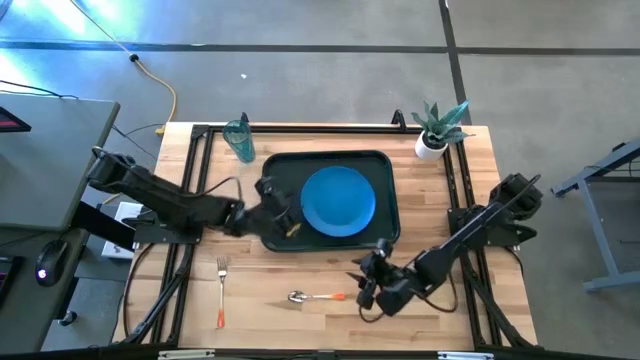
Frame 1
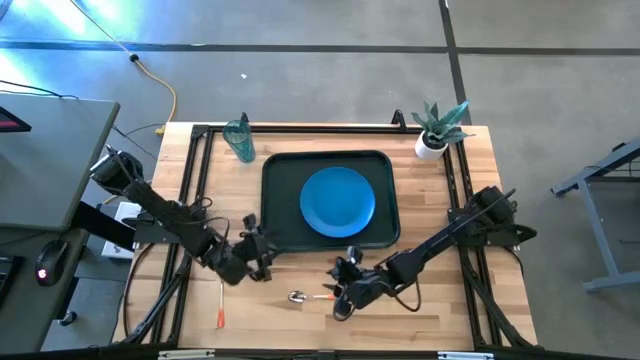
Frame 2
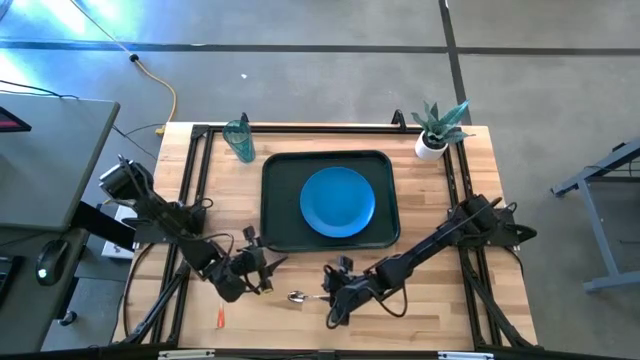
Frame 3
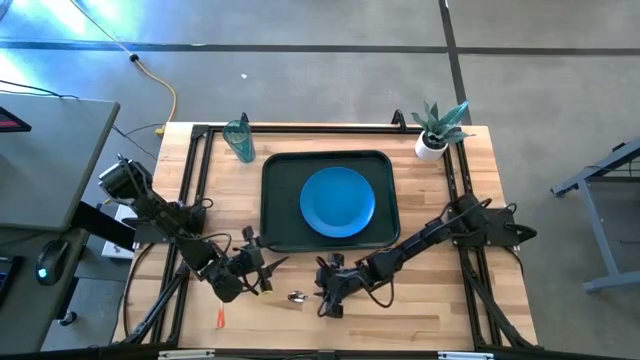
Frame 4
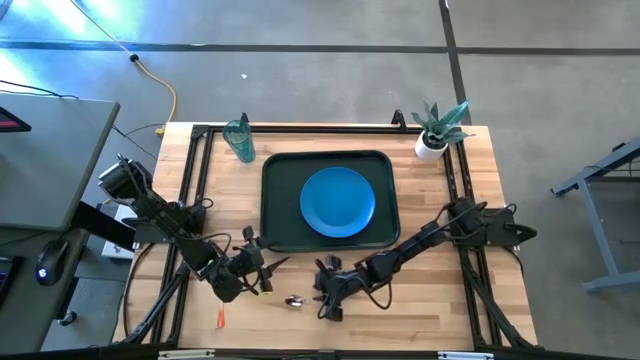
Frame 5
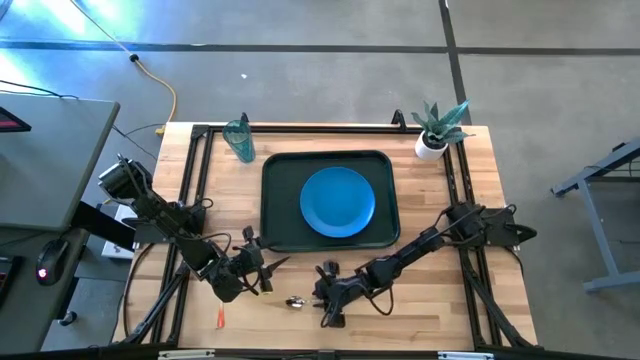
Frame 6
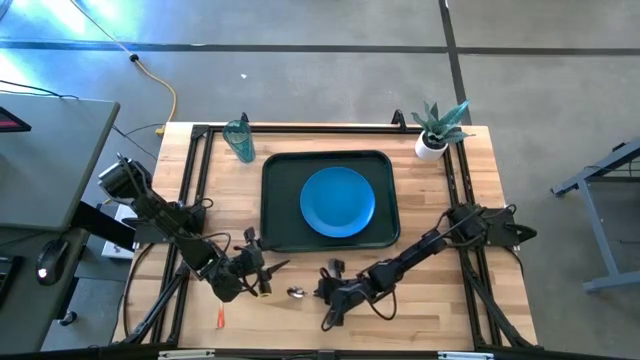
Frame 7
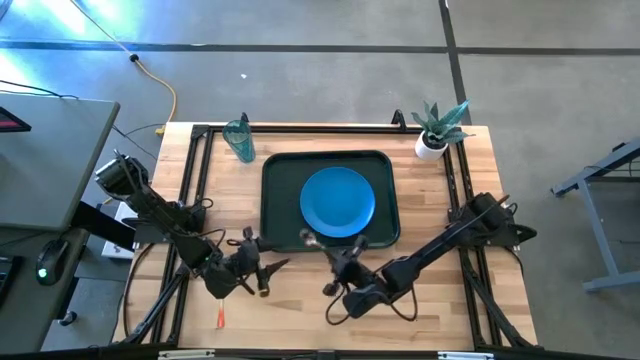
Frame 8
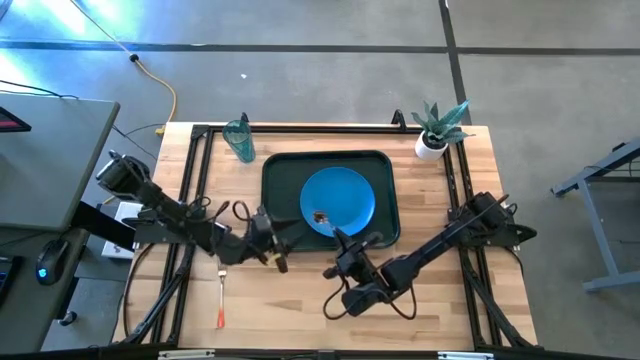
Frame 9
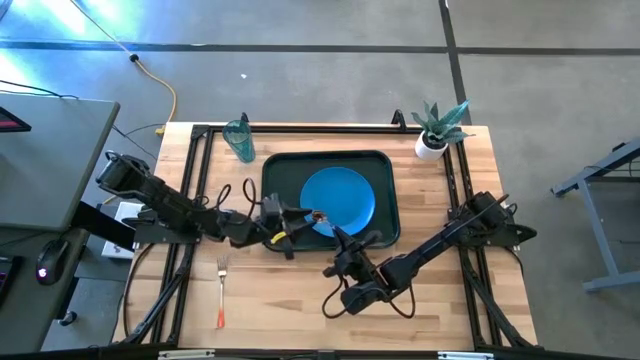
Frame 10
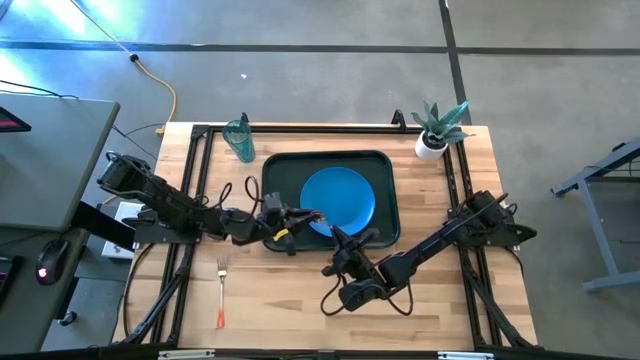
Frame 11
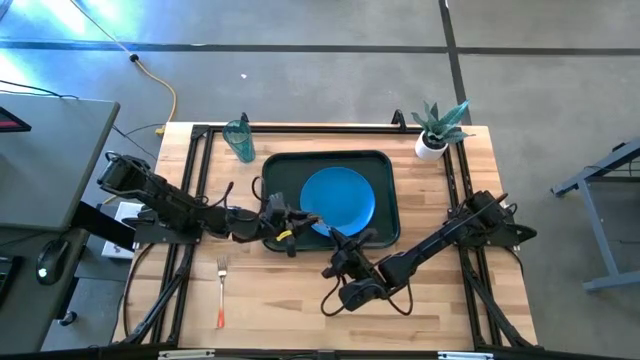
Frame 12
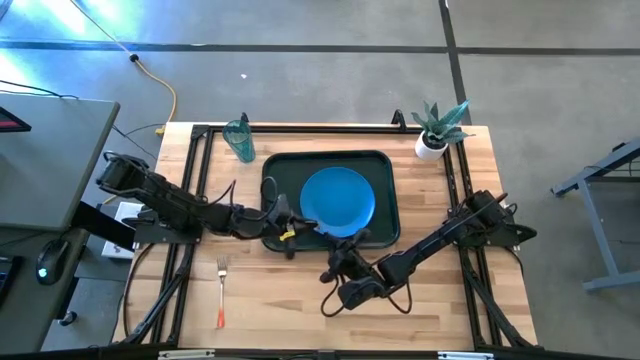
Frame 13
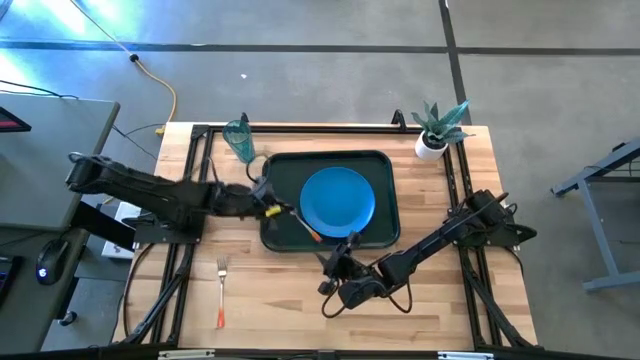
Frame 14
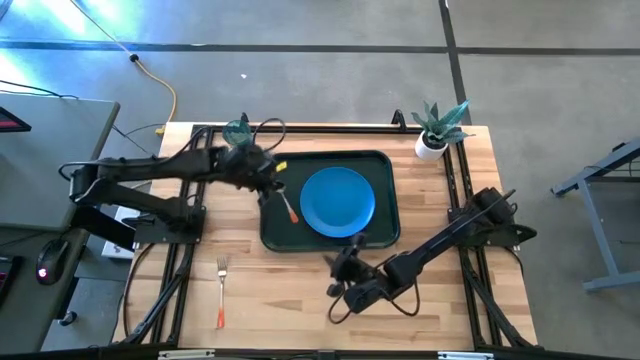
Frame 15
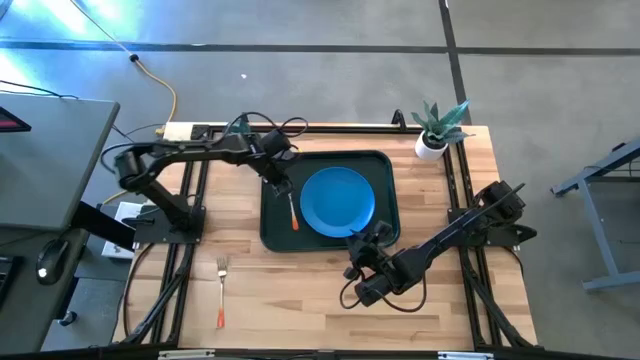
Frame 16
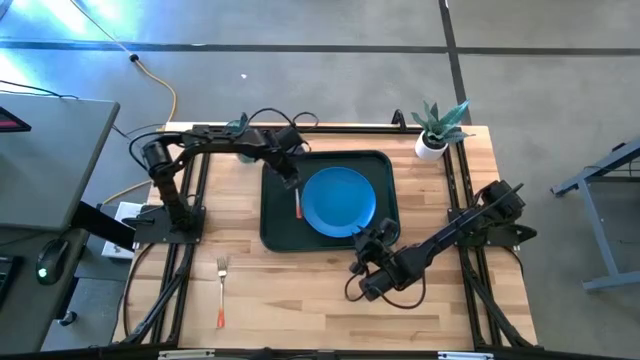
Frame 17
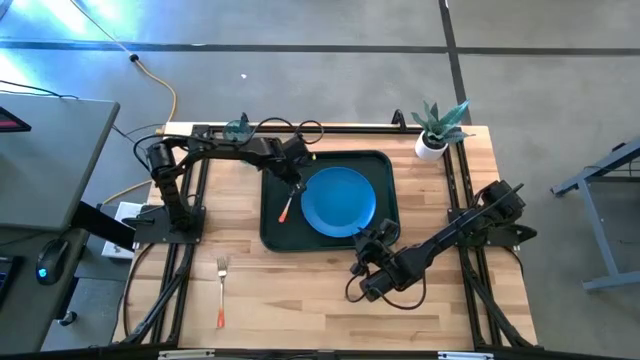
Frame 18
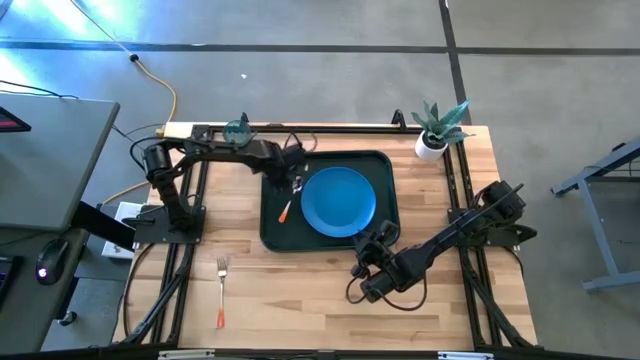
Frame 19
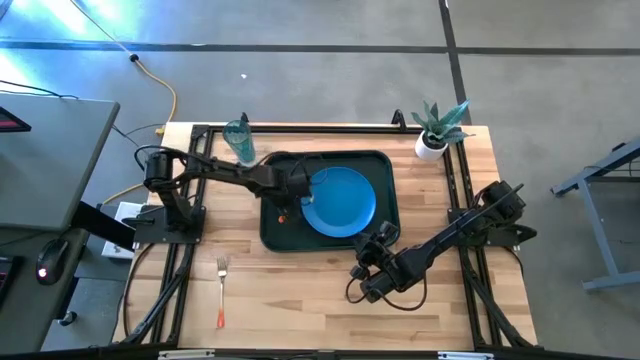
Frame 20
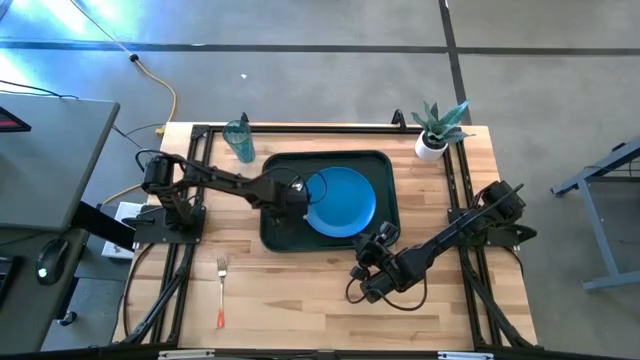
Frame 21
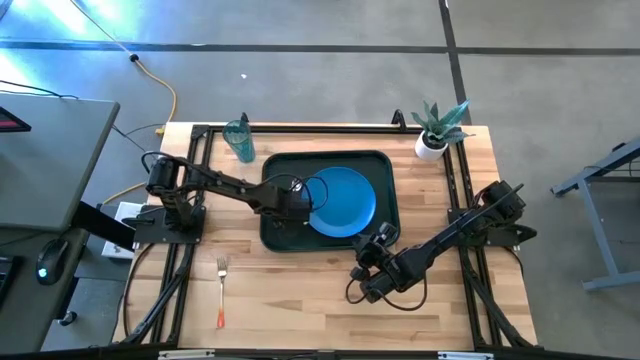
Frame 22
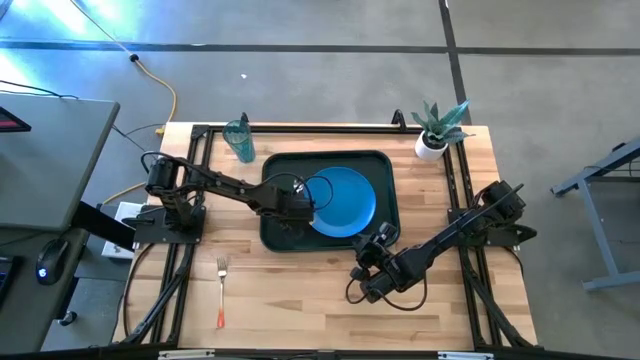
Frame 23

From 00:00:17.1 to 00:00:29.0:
Task: Pick and place plate/cup/fork/spoon on tray
Put the orange spoon on the black tray

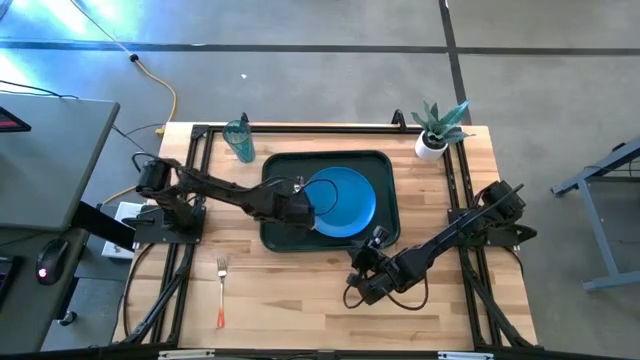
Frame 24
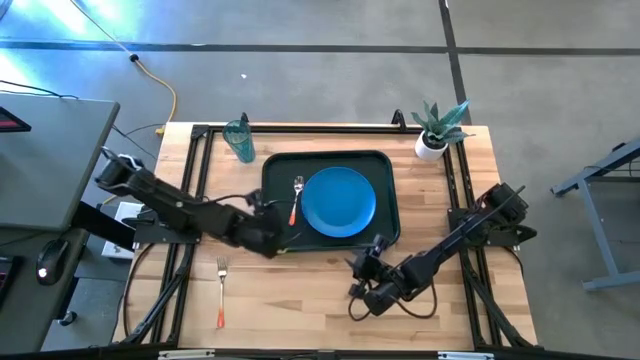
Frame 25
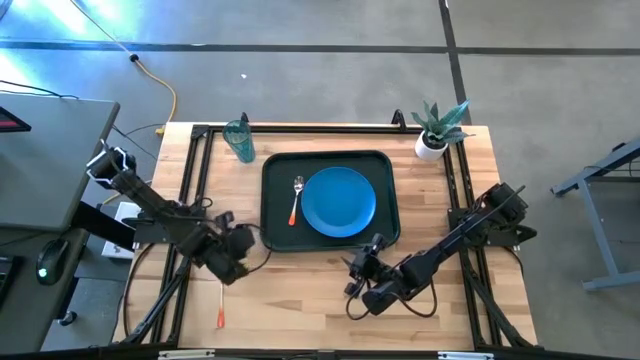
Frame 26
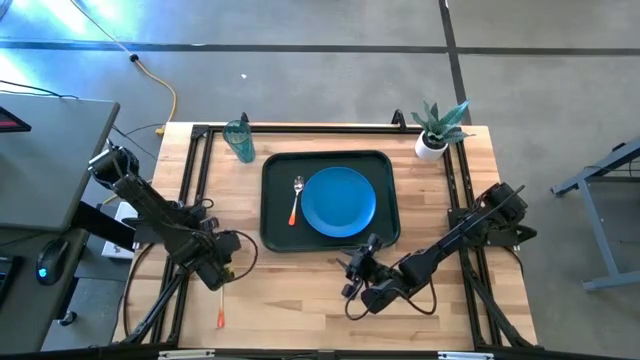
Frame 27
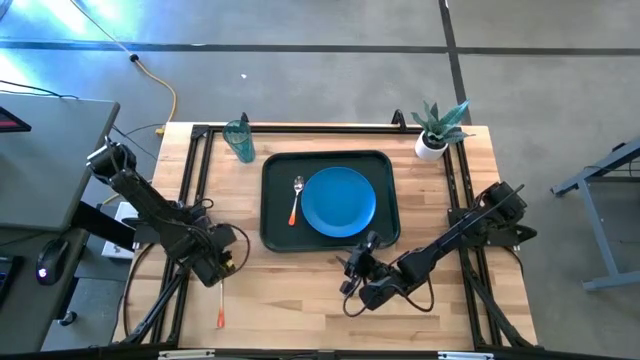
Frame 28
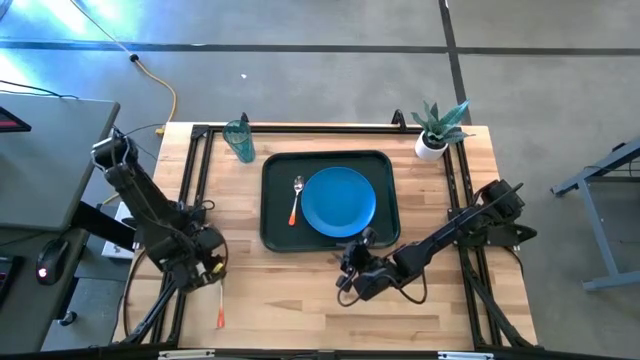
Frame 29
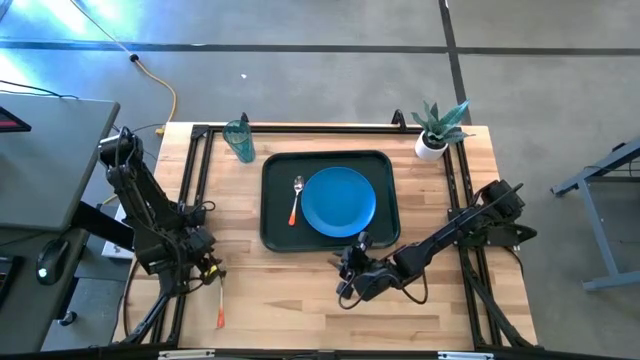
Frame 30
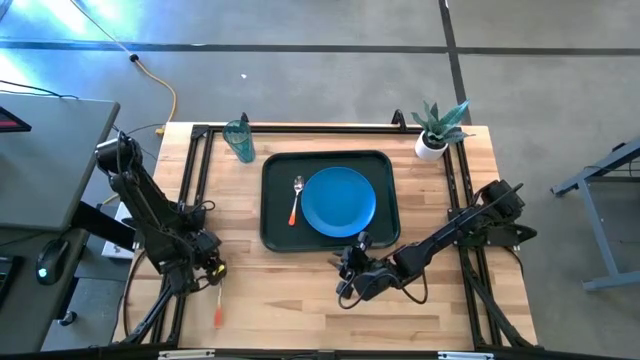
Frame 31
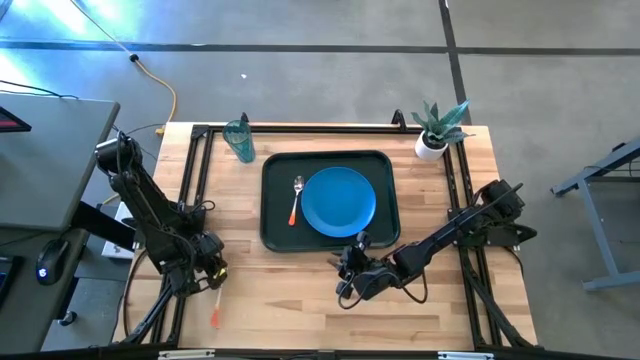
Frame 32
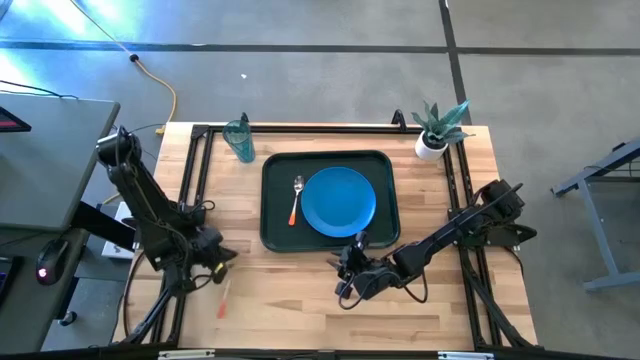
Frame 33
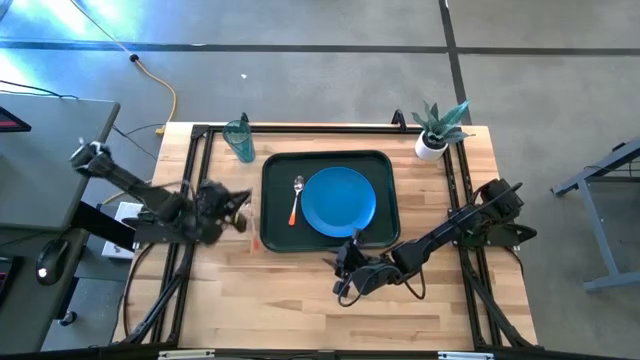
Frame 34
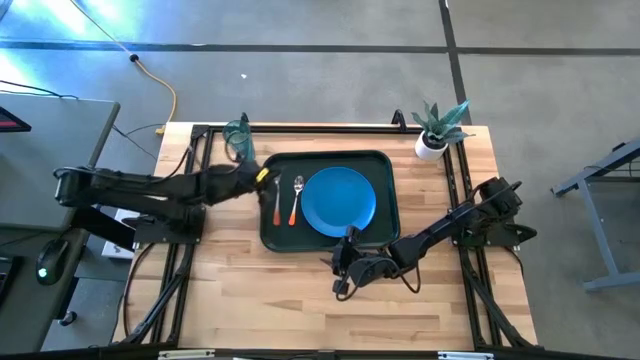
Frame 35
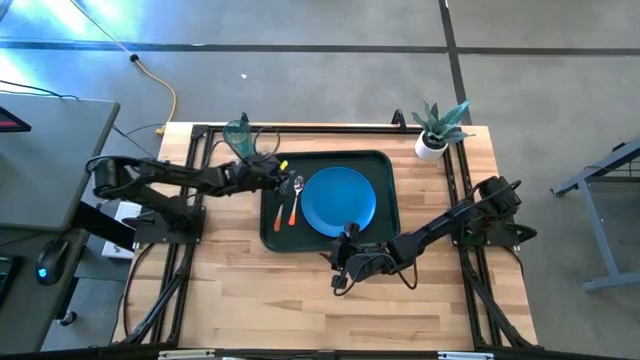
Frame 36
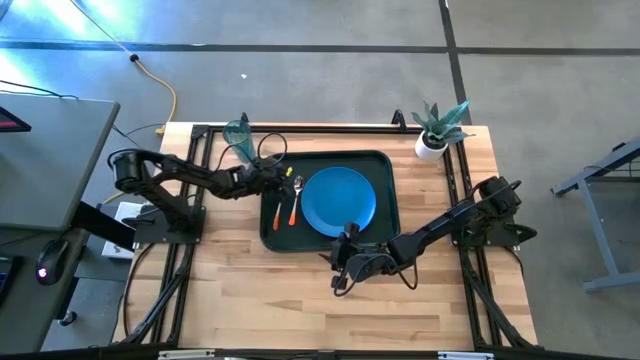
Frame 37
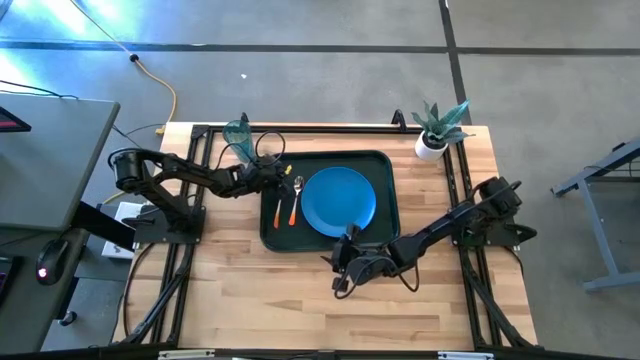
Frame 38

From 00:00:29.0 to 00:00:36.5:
Put the orange fork on the black tray

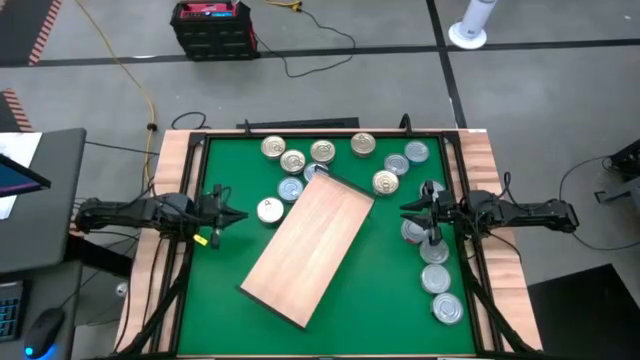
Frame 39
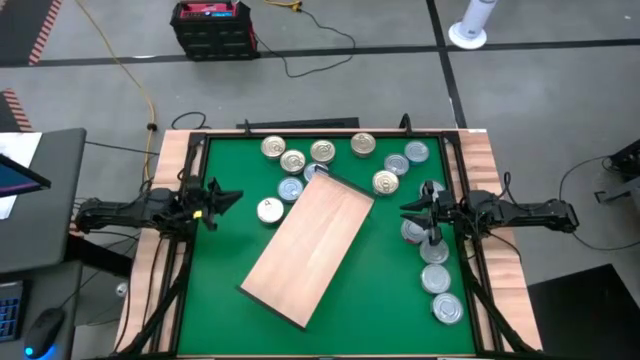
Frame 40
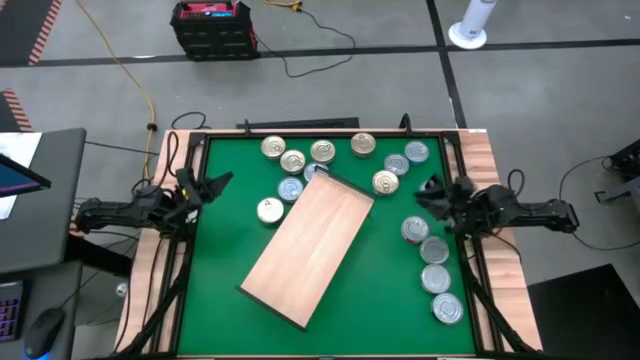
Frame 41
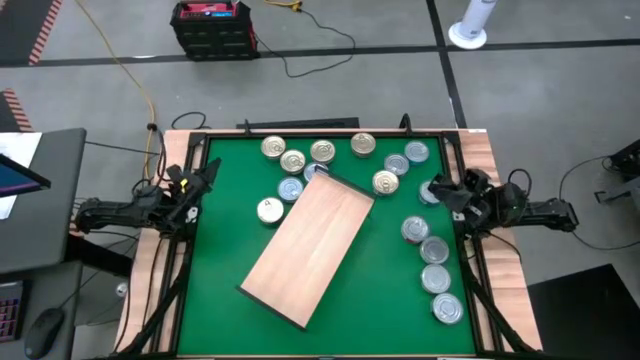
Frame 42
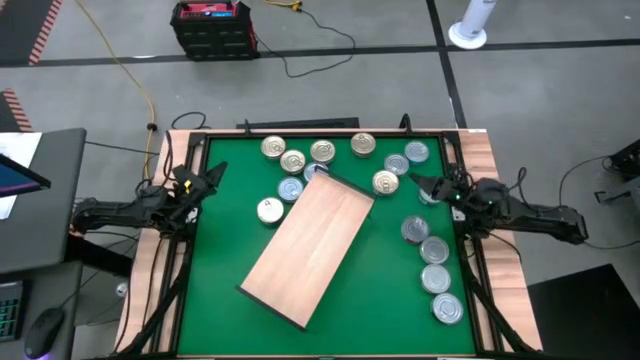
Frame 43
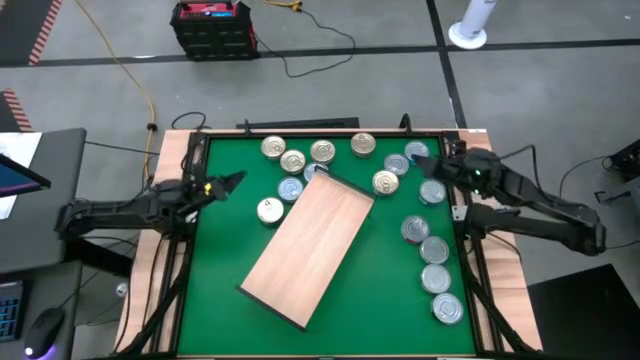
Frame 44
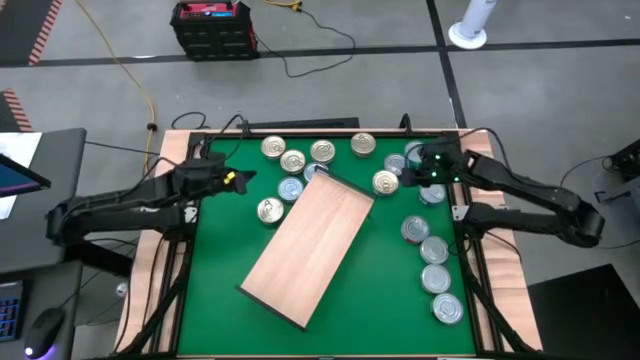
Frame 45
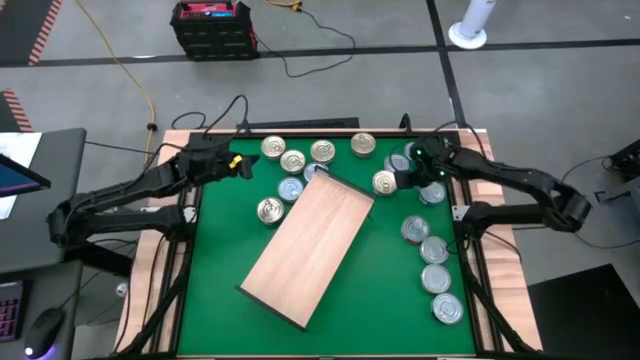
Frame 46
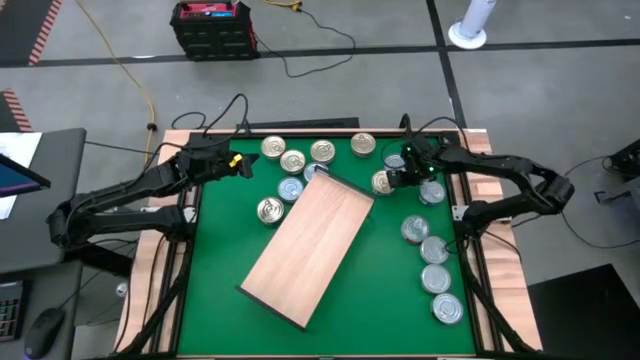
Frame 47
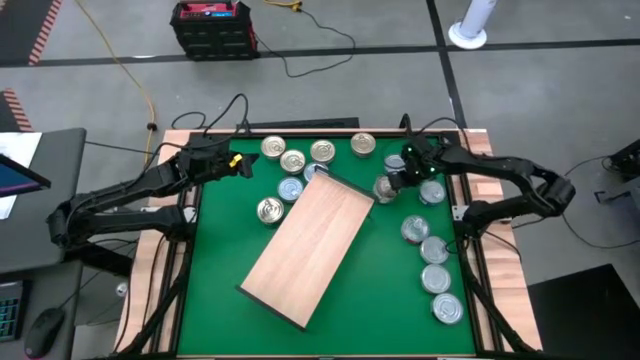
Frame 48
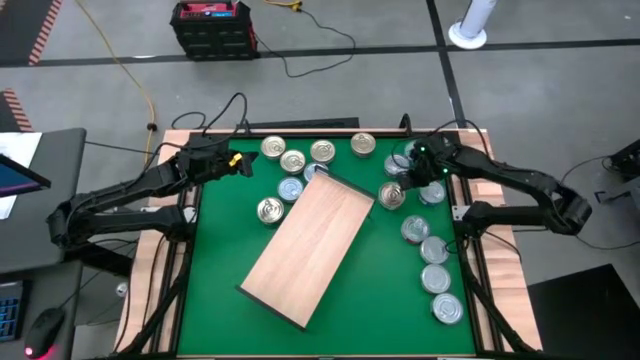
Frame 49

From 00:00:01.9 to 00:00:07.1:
Task: Stack canned seafood by type on shelf
Put the blue pink tuna can on the shelf
